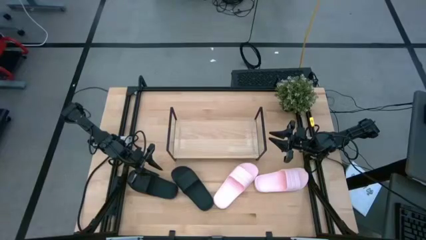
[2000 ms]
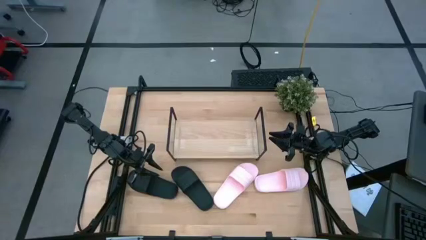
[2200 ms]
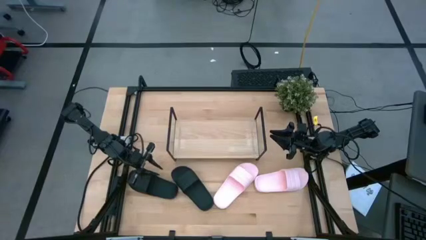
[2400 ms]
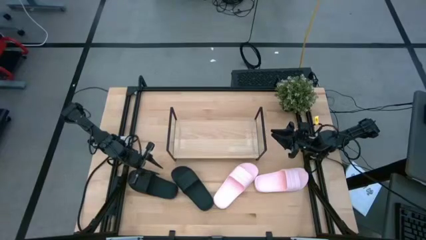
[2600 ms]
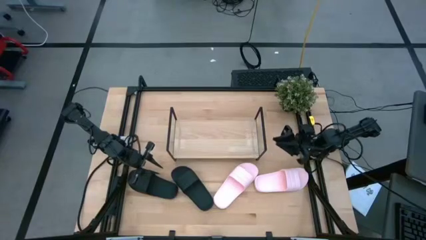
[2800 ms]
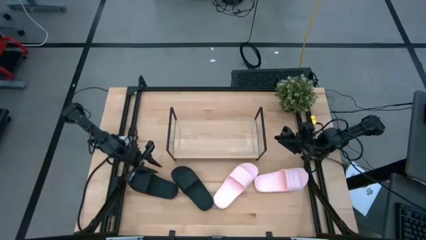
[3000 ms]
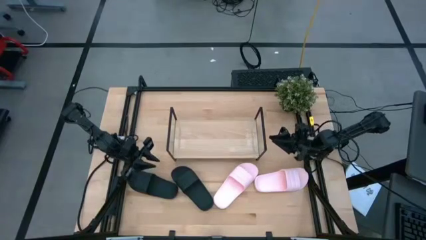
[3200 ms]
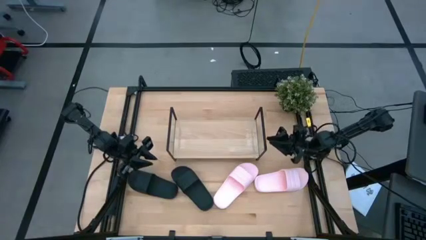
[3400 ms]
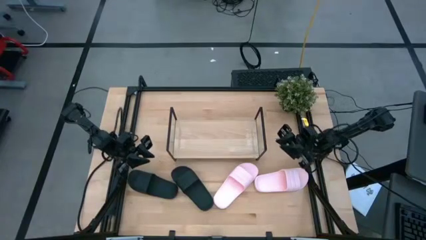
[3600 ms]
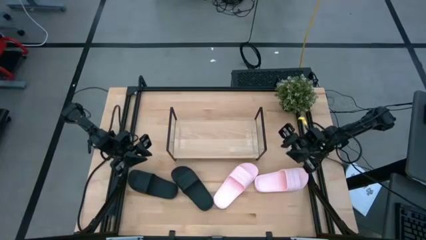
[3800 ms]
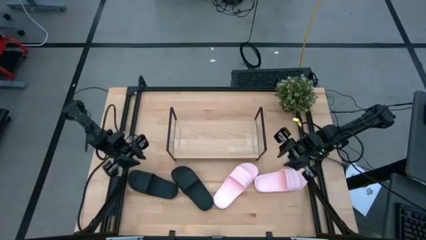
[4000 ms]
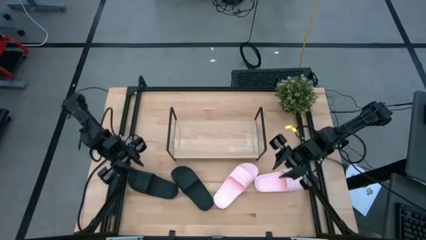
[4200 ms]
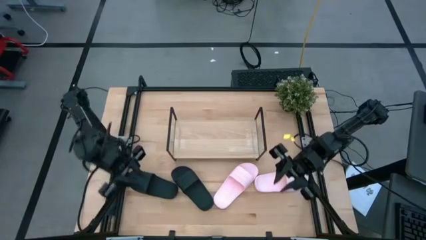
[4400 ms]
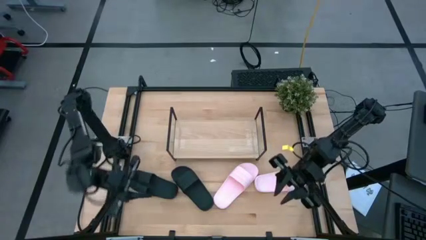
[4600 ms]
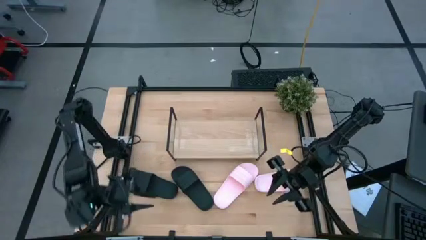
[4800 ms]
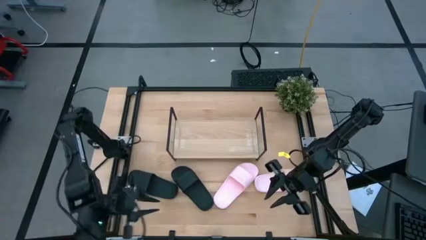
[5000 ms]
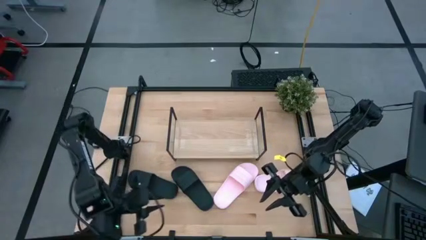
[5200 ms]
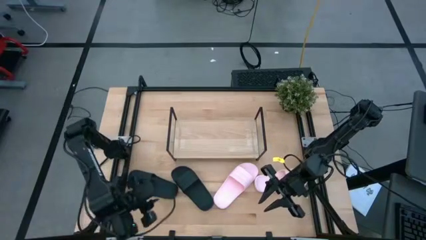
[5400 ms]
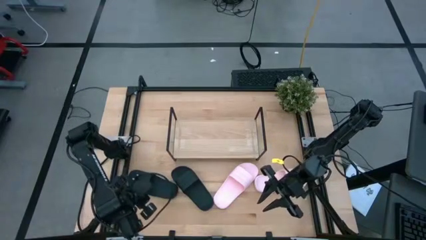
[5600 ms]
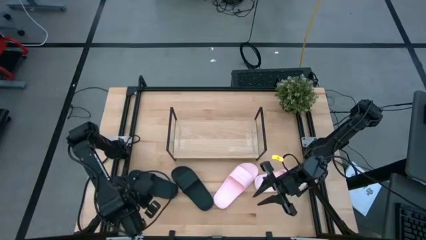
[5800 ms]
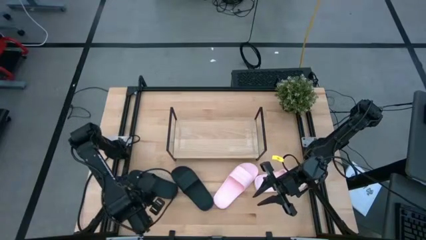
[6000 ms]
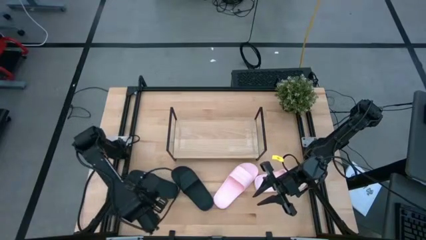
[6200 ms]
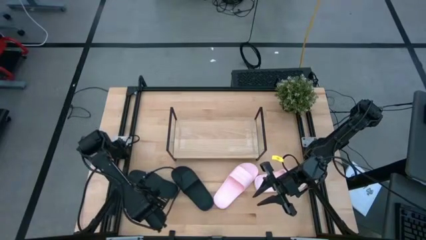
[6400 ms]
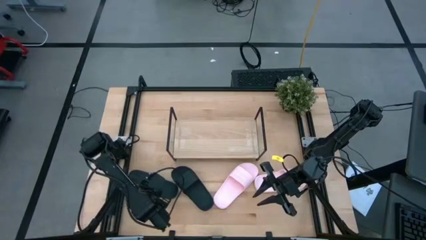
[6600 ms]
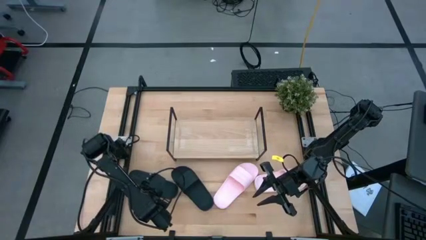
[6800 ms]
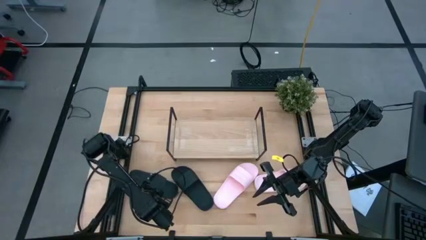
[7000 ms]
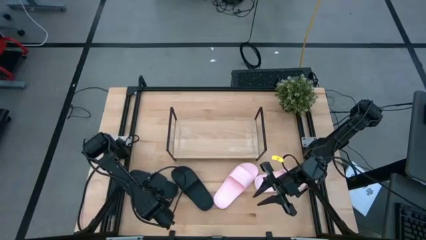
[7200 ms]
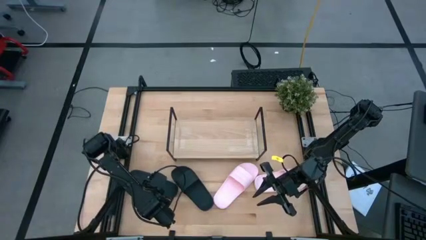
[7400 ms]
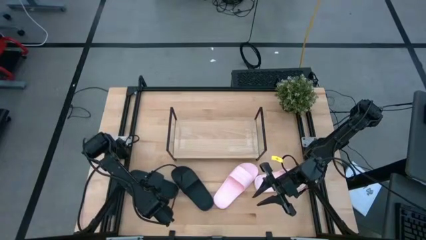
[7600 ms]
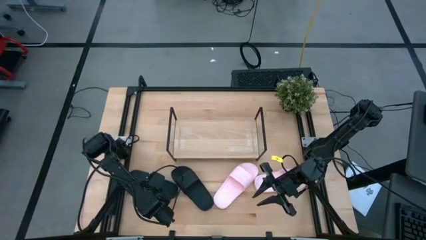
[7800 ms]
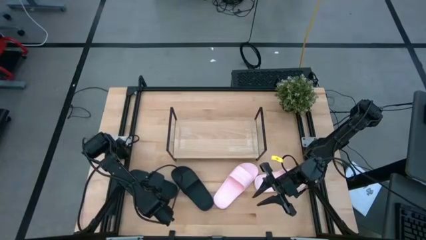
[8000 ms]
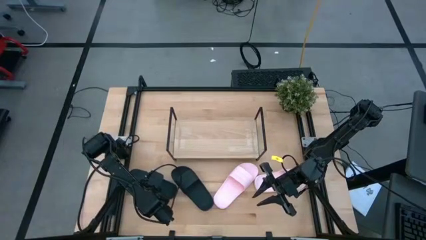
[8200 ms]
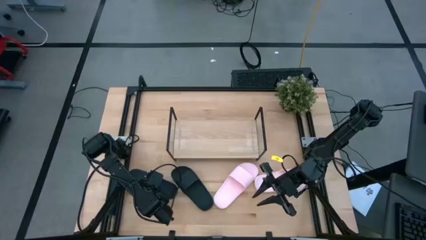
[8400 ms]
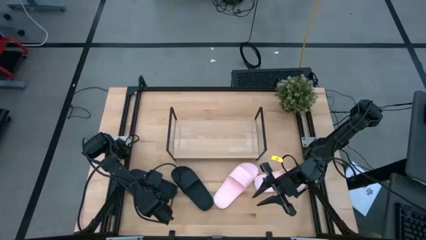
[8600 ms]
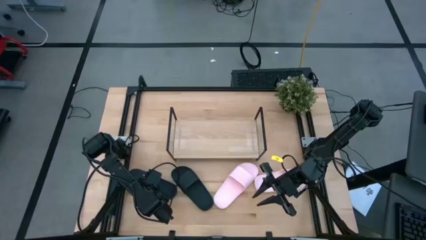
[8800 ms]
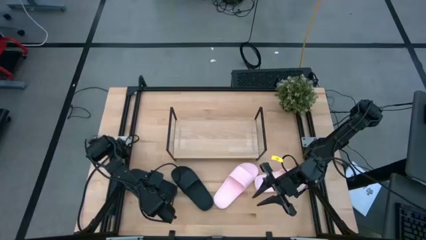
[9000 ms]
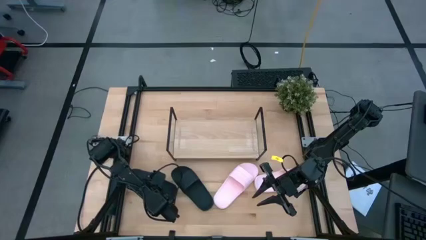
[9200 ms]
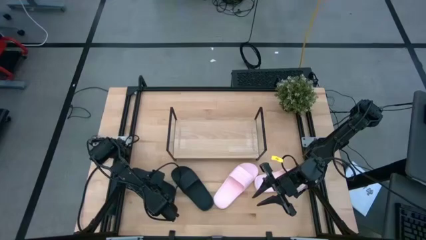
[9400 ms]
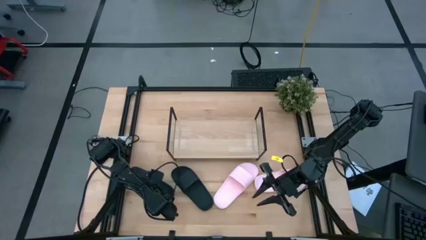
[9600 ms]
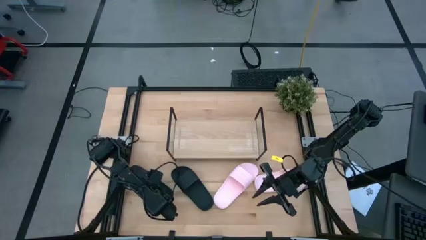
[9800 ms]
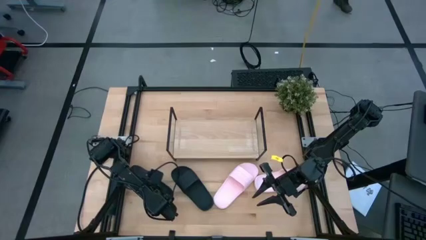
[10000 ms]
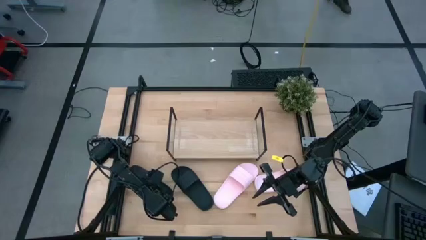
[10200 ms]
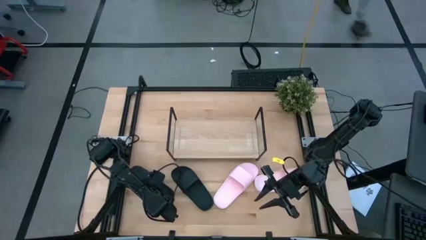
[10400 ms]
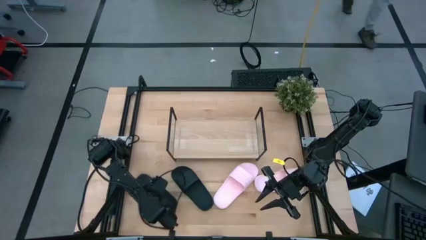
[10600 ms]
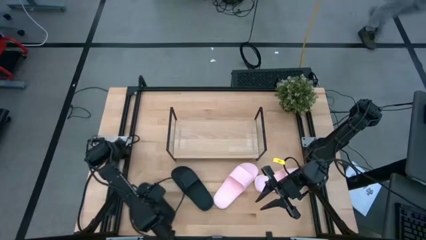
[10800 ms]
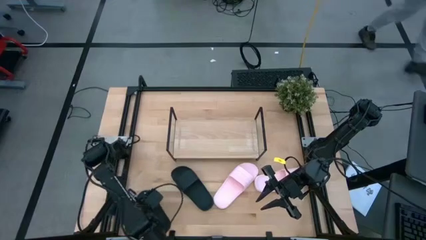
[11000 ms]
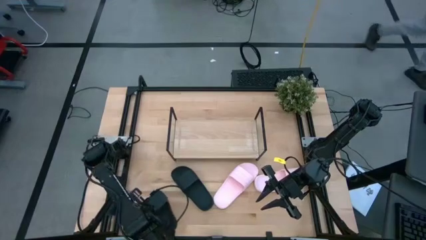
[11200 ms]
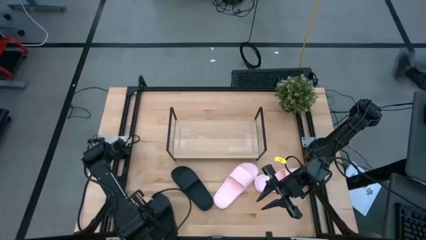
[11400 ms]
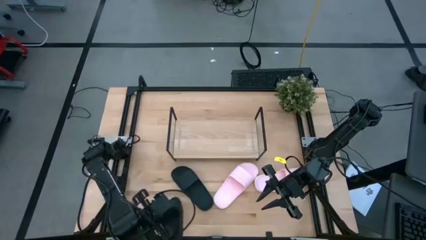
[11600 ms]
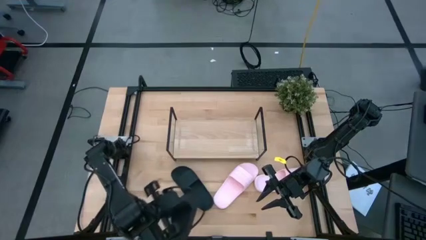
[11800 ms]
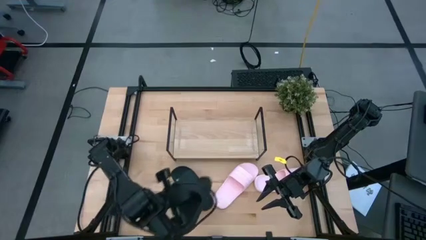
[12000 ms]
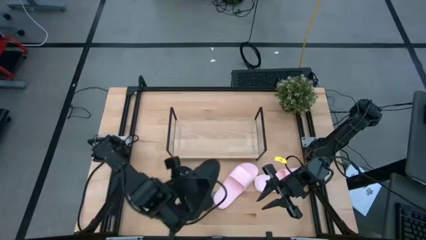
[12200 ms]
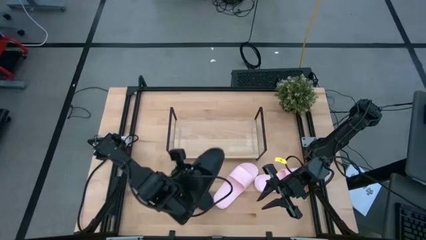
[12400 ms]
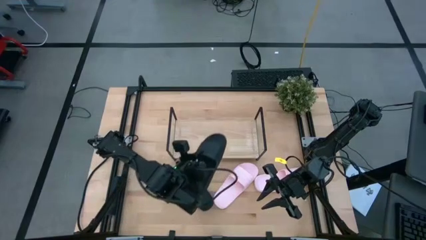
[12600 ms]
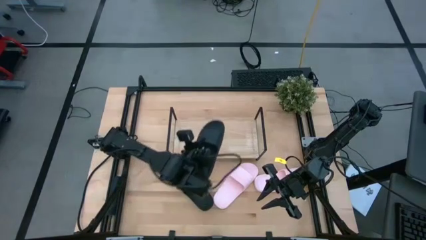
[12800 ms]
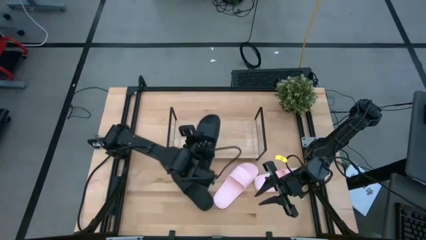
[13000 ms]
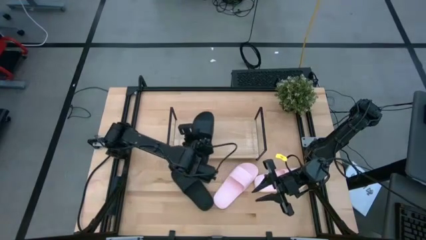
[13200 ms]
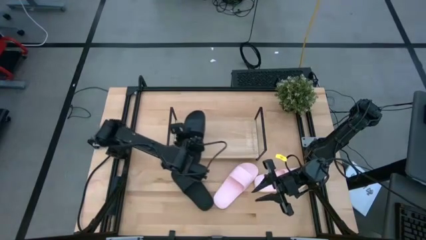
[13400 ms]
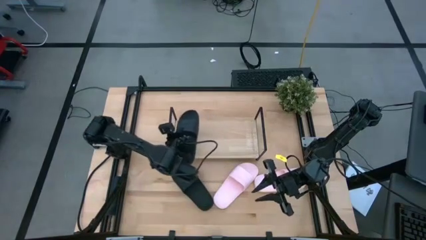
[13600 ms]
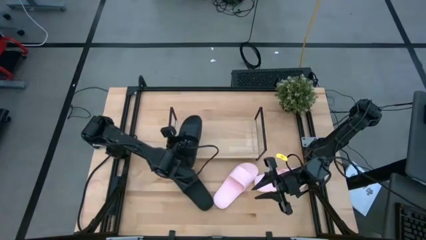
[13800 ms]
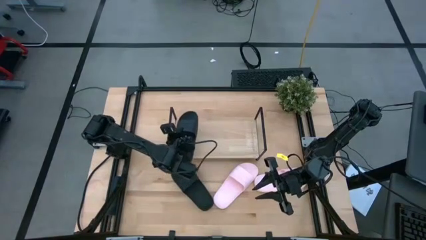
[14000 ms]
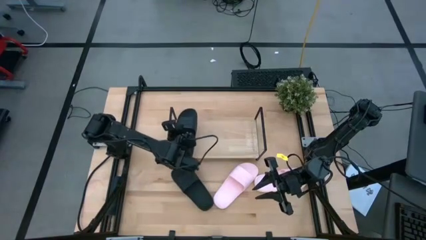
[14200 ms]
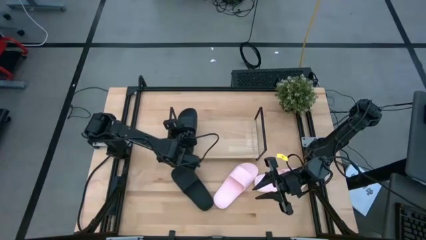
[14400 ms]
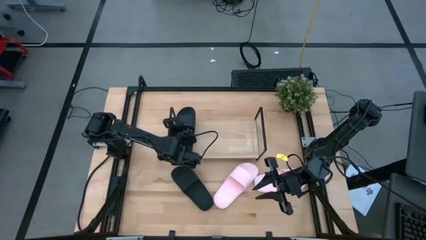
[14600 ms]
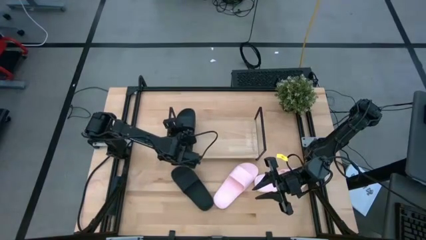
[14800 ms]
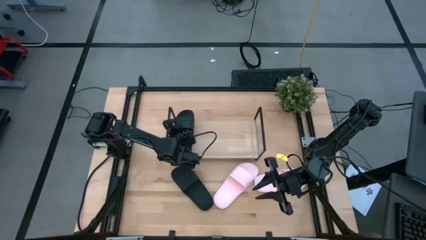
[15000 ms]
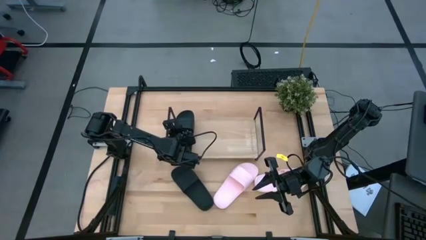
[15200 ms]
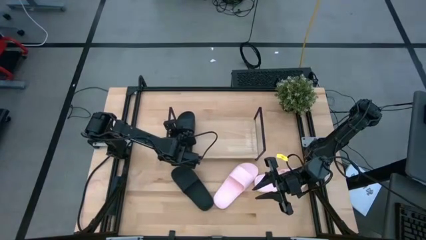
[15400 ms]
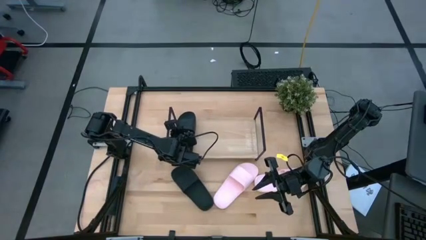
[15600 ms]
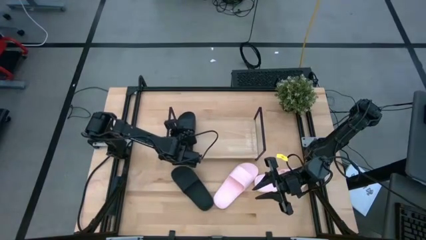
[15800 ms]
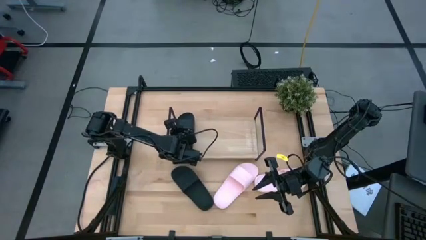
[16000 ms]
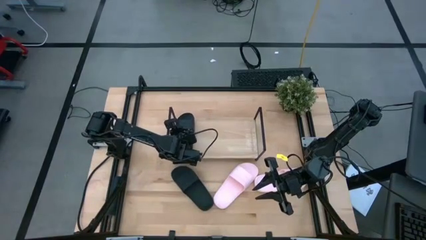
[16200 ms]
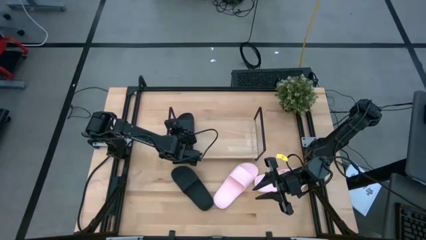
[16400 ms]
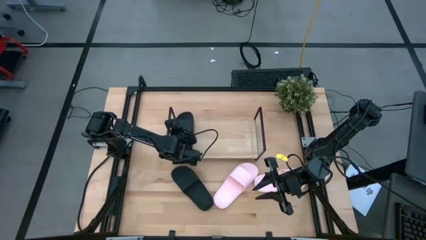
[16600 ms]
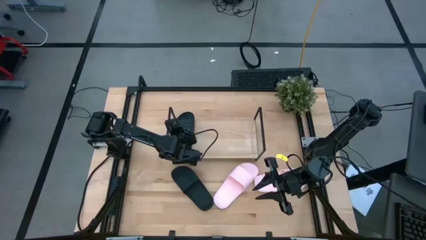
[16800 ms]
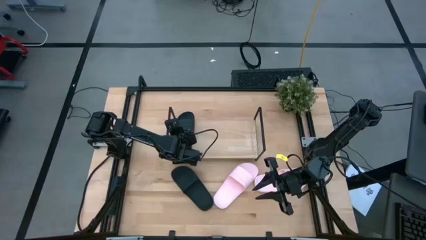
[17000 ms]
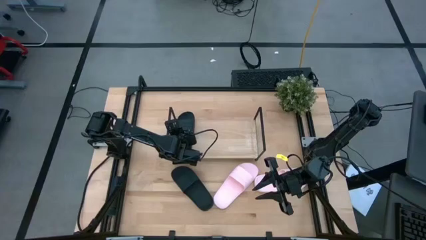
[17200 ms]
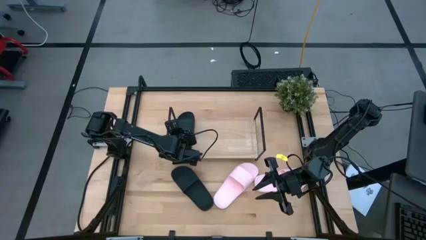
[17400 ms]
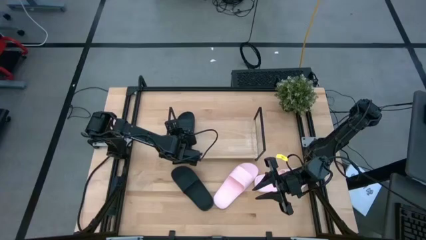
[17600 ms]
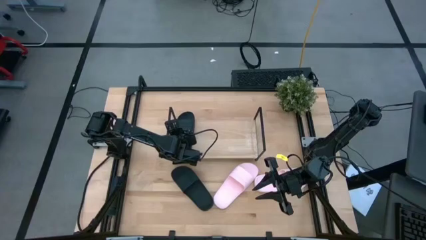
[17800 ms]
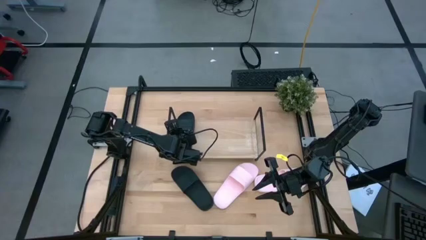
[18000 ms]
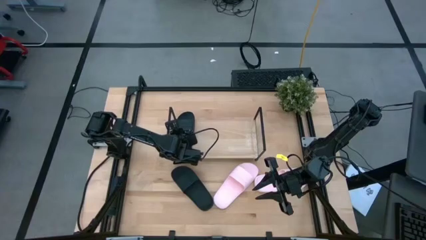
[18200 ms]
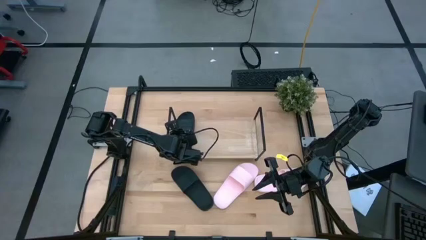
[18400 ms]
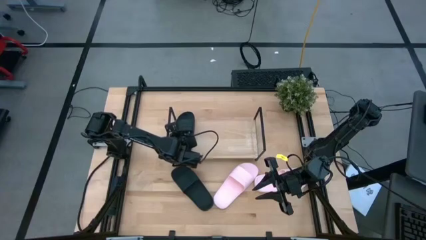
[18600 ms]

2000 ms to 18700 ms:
Task: Pick and place slides into the shelf
Put the left black slipper on the shelf
